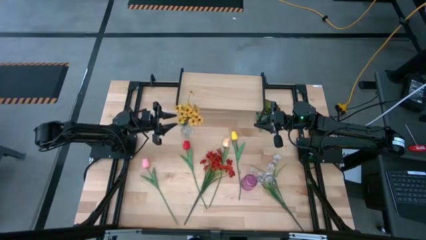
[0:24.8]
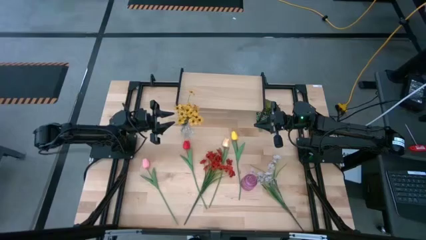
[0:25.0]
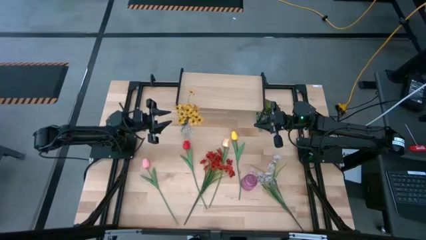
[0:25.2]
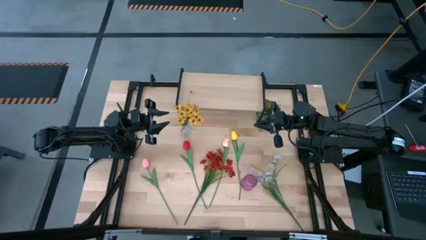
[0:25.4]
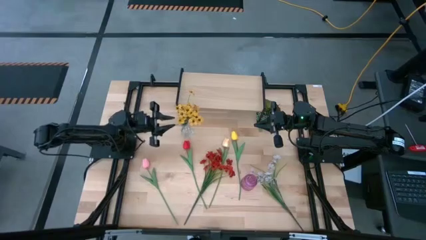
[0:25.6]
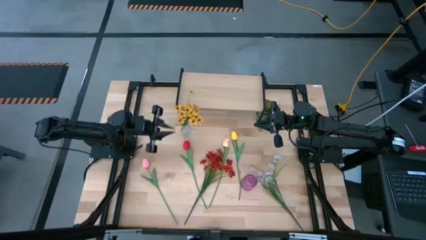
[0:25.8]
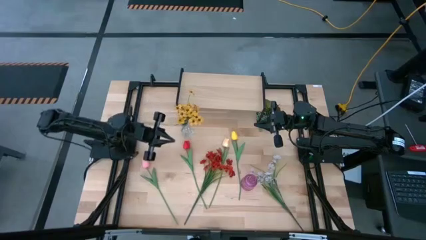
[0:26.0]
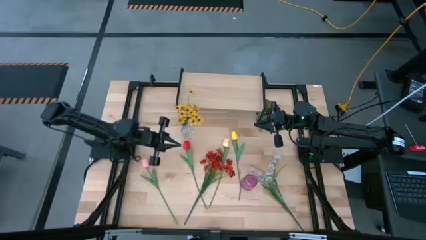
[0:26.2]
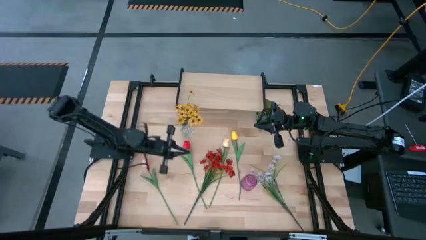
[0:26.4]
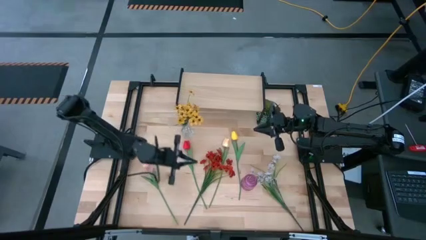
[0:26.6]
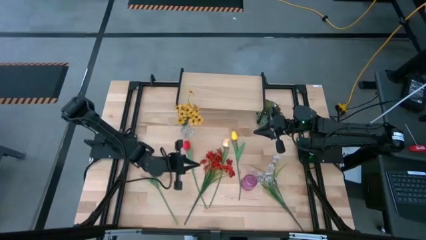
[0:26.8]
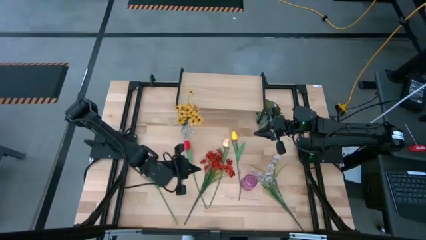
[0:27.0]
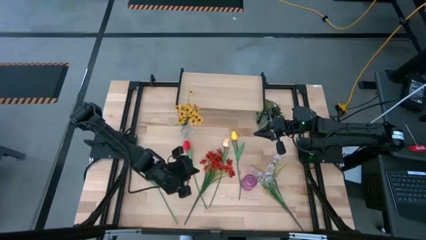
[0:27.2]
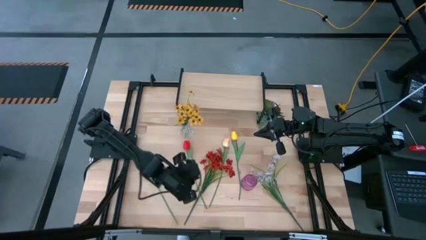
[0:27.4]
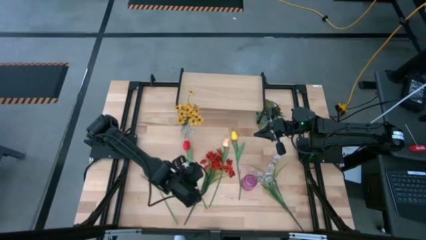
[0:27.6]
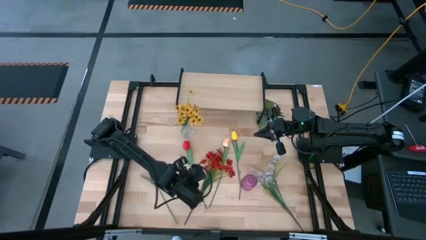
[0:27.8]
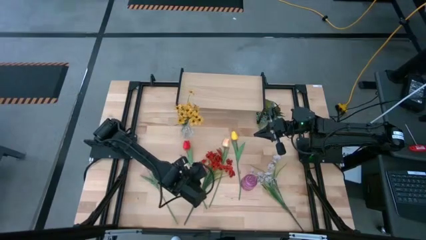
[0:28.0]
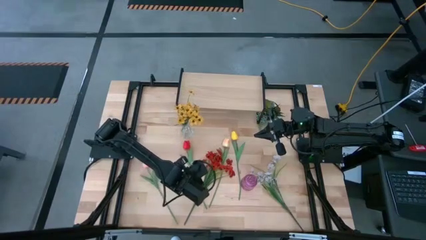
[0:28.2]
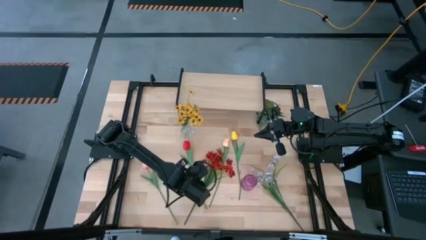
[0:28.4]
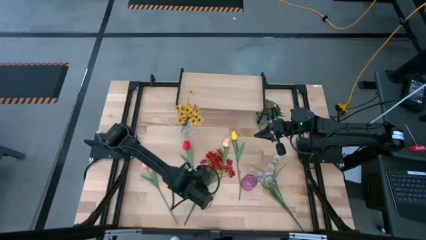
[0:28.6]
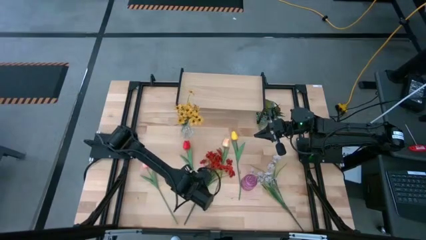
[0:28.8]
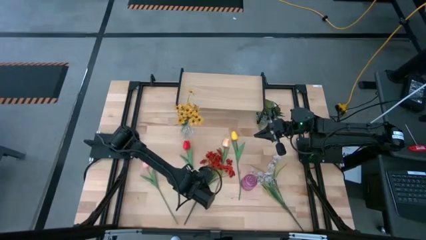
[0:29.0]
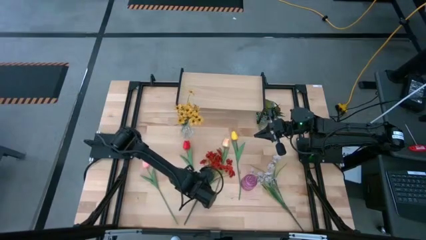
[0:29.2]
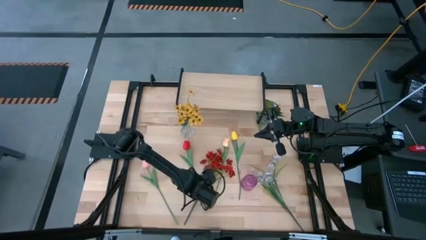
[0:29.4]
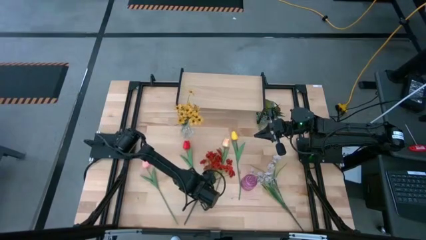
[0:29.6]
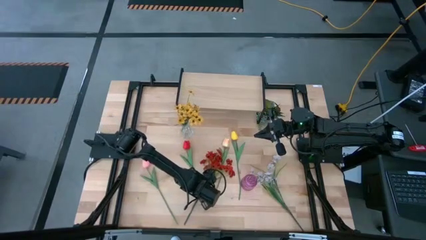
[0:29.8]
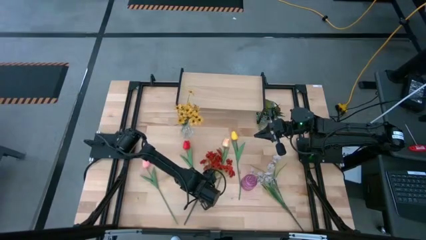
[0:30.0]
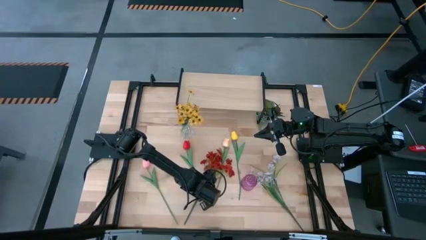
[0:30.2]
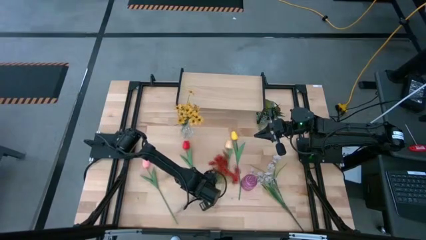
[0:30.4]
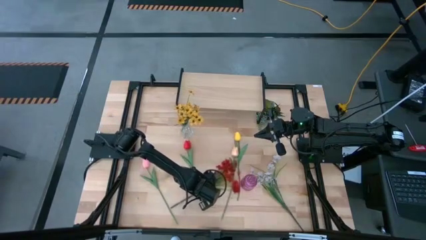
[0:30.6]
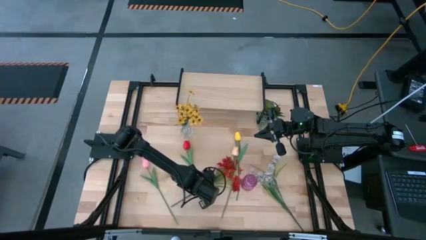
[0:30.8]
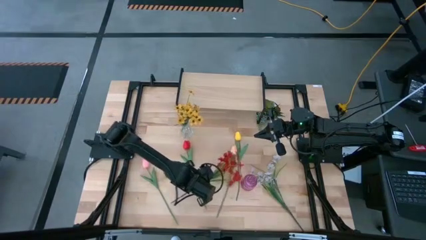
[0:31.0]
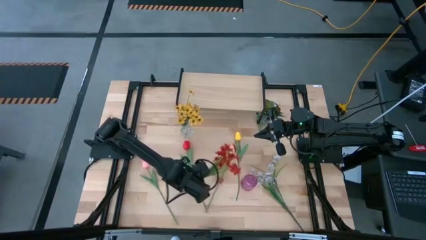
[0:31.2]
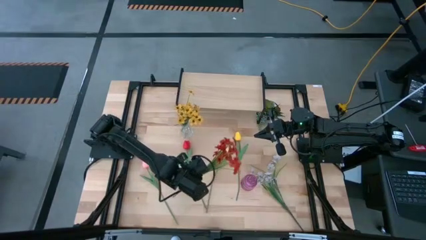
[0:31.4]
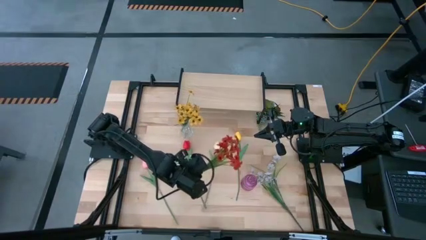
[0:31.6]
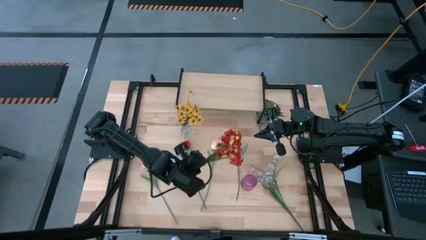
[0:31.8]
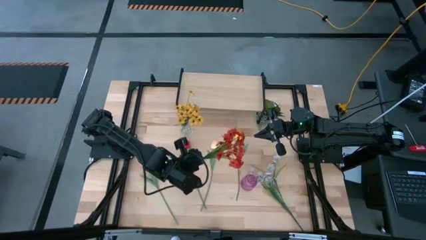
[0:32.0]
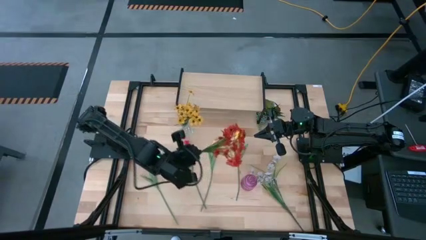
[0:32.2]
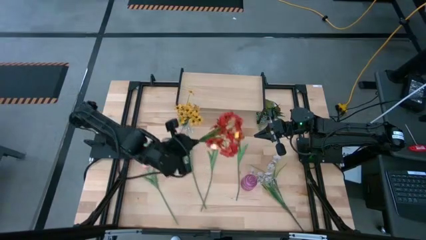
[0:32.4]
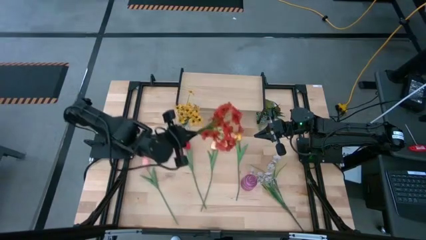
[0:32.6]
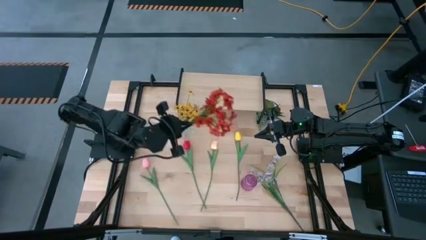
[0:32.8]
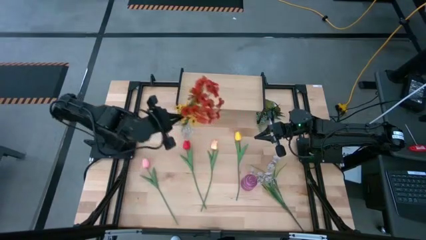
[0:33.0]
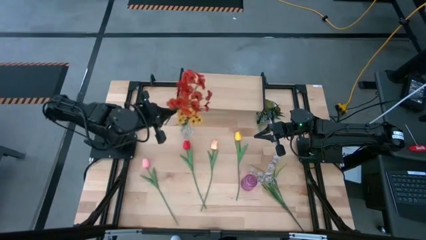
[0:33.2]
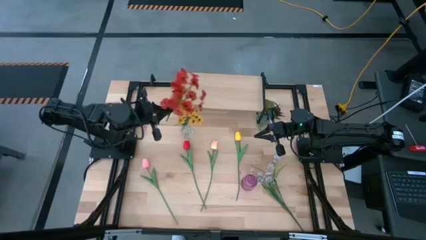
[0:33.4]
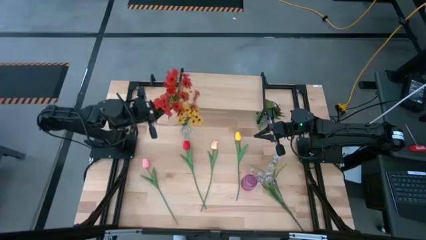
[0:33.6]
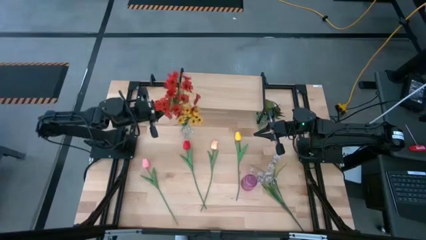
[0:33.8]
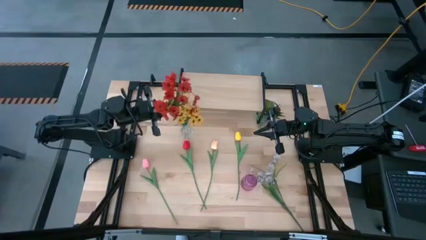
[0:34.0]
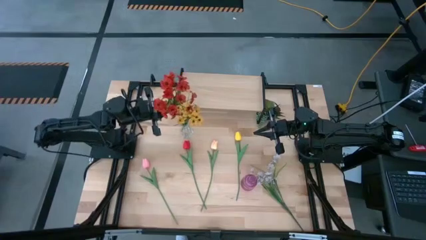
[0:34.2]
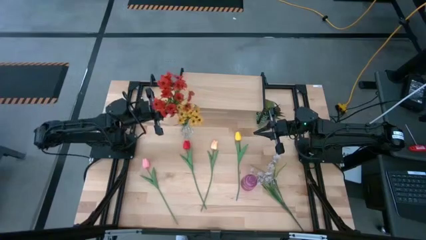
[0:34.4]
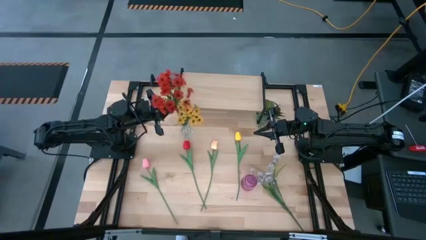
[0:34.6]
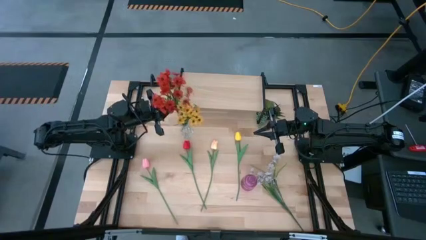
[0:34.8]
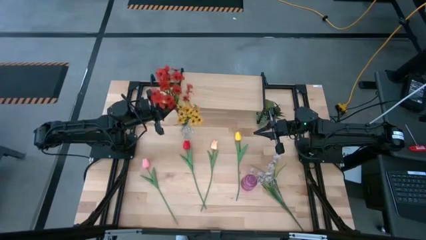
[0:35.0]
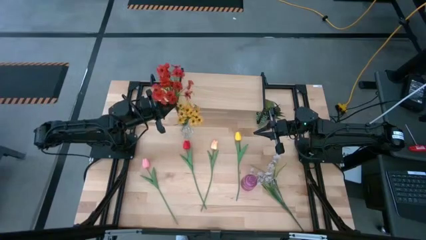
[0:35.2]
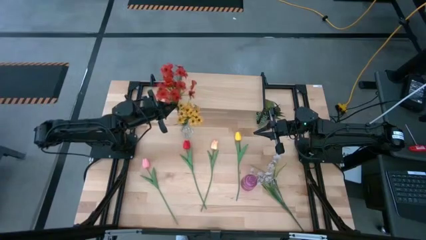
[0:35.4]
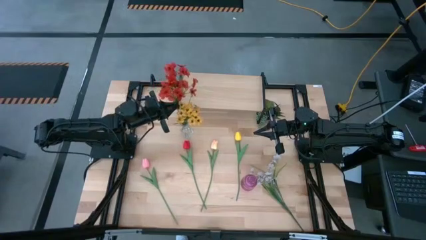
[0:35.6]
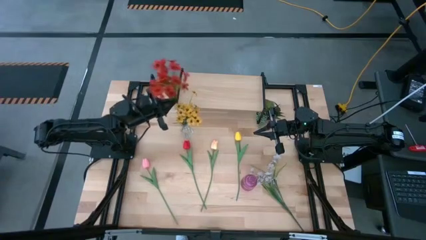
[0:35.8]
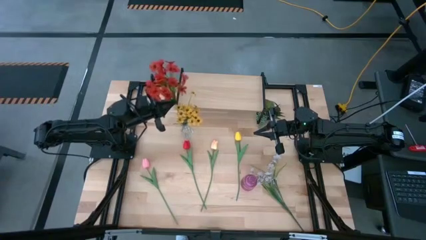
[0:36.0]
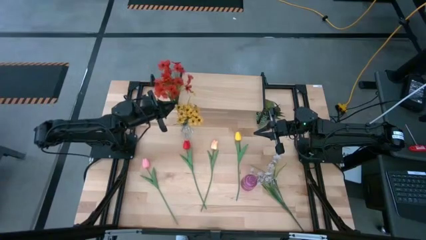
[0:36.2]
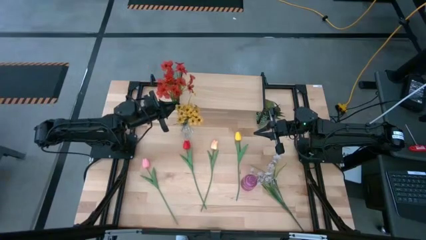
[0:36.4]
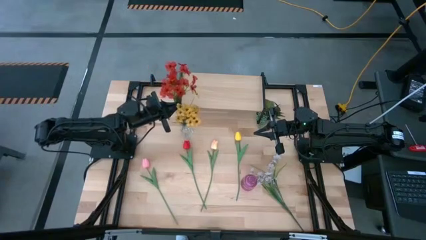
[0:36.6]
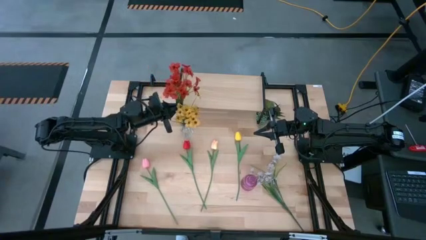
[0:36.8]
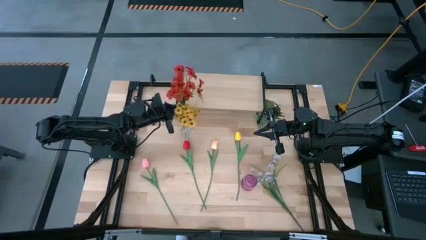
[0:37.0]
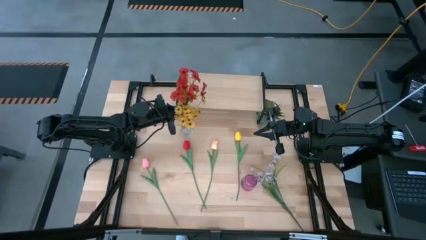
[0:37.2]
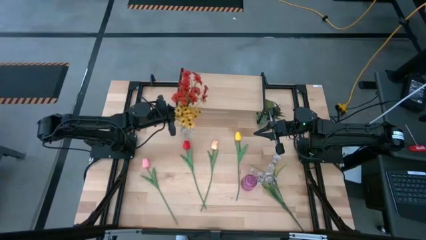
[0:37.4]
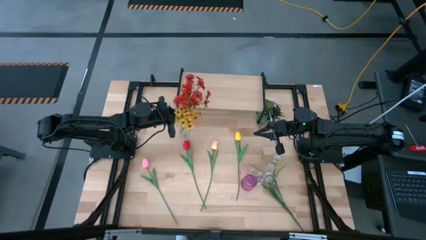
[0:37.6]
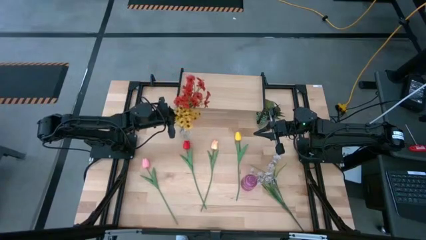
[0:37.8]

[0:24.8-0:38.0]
Task: Pick and place flowers into a vace then onto a shelf
Put the red flowers into the transparent vase
